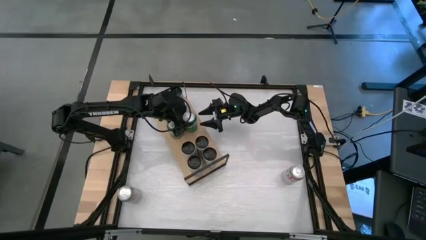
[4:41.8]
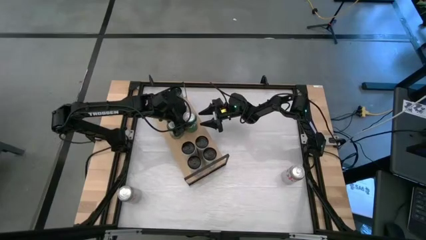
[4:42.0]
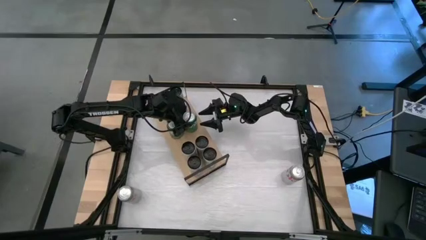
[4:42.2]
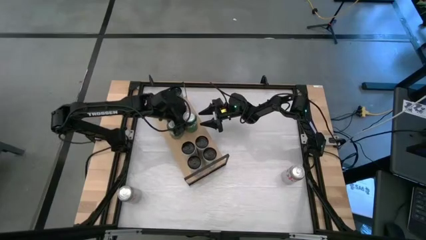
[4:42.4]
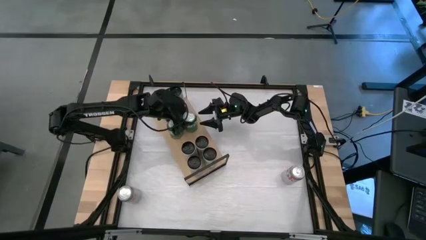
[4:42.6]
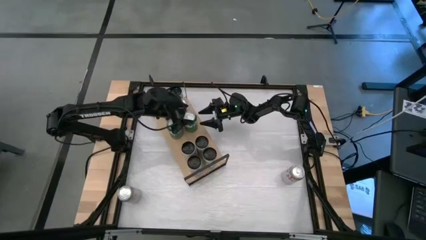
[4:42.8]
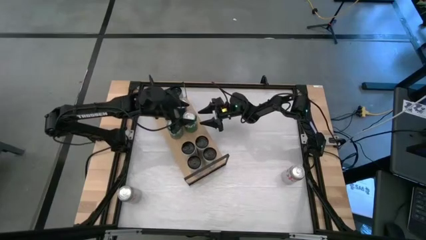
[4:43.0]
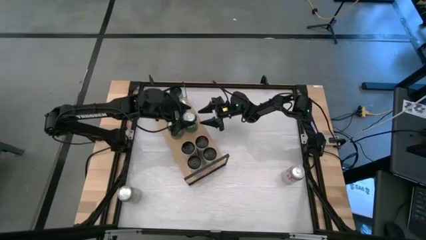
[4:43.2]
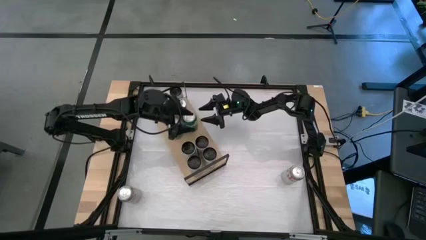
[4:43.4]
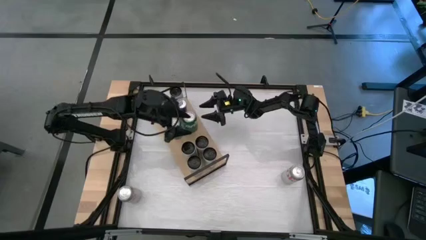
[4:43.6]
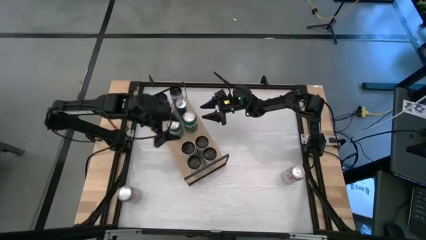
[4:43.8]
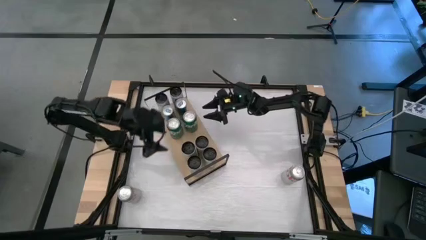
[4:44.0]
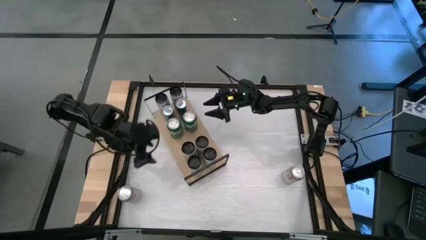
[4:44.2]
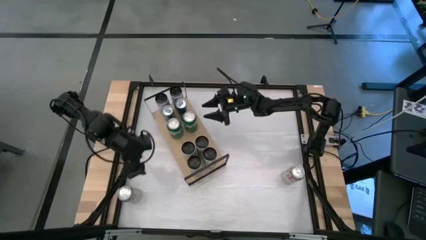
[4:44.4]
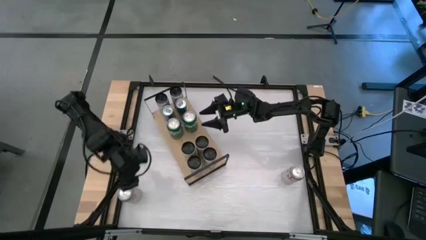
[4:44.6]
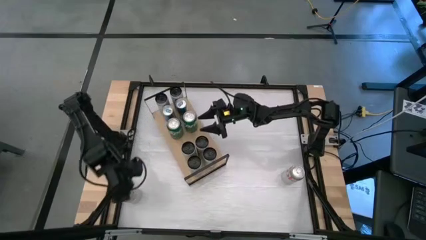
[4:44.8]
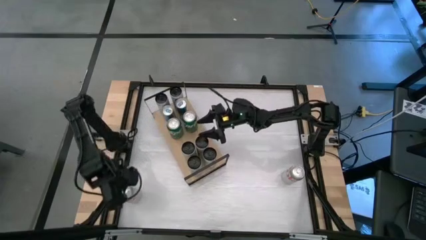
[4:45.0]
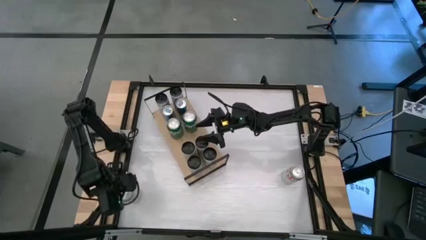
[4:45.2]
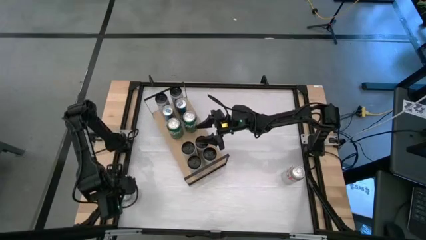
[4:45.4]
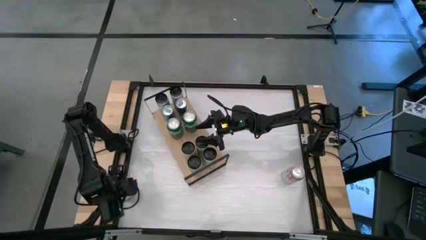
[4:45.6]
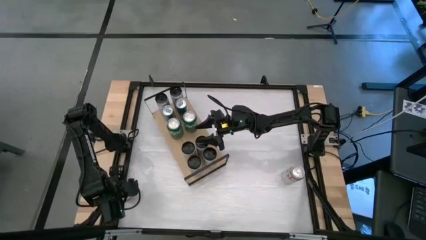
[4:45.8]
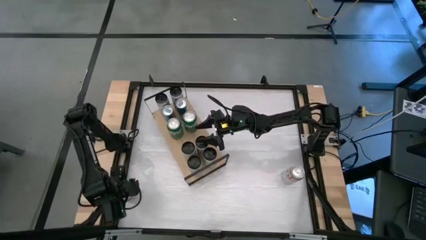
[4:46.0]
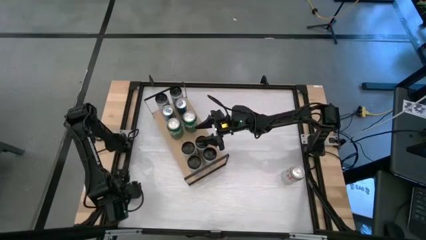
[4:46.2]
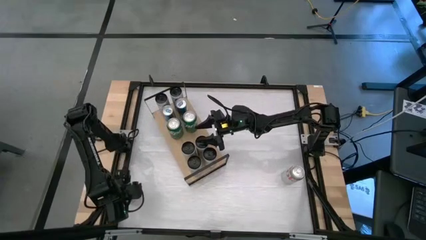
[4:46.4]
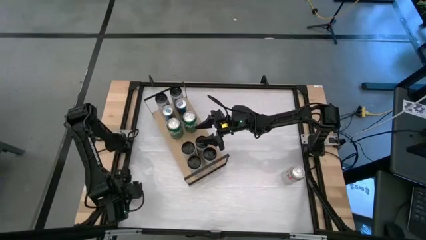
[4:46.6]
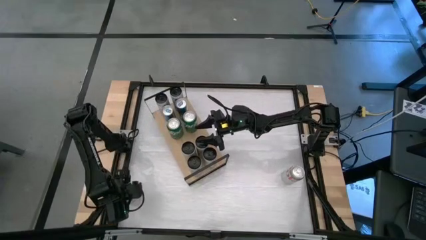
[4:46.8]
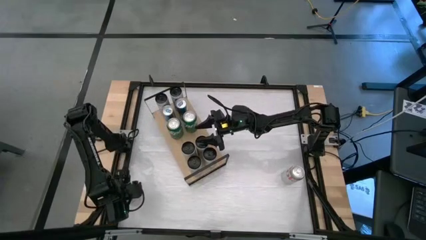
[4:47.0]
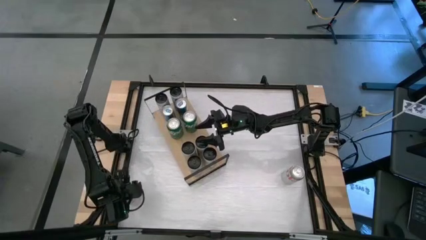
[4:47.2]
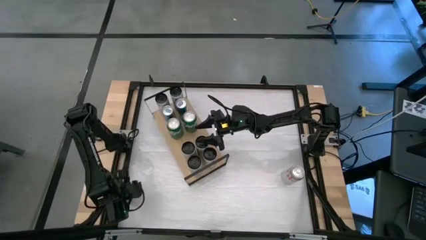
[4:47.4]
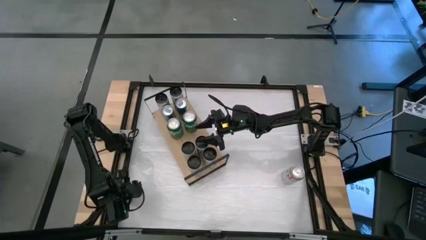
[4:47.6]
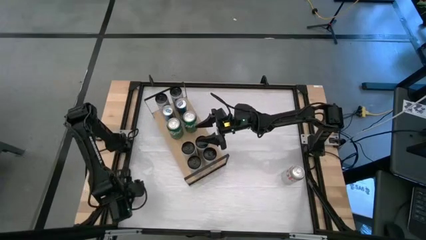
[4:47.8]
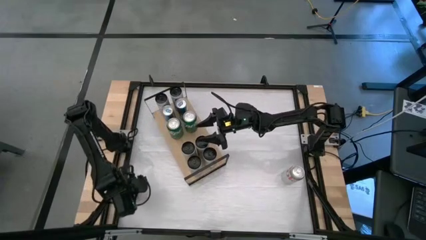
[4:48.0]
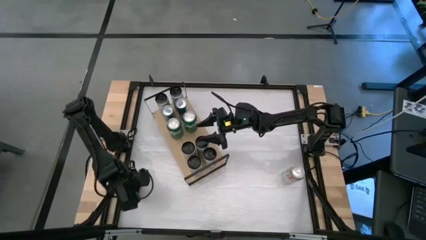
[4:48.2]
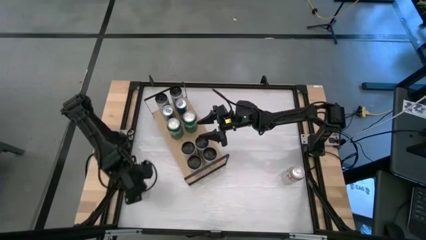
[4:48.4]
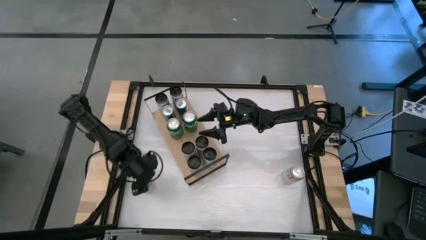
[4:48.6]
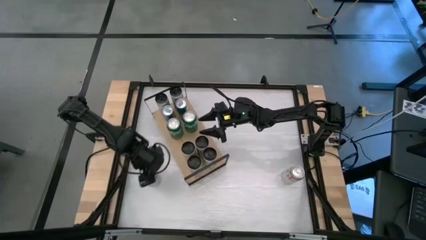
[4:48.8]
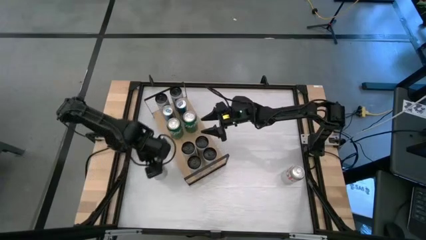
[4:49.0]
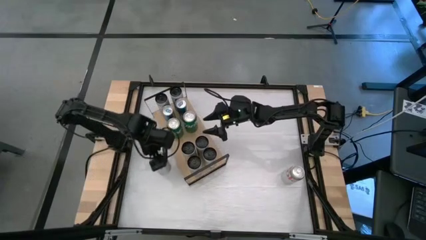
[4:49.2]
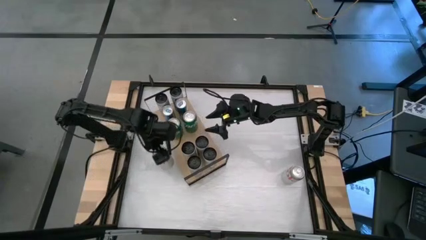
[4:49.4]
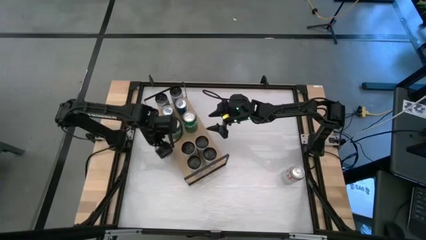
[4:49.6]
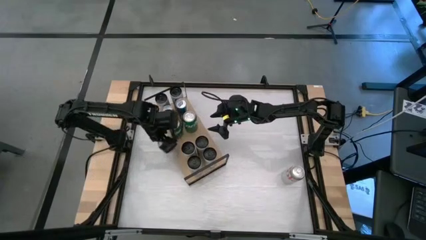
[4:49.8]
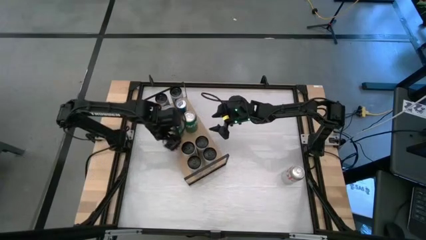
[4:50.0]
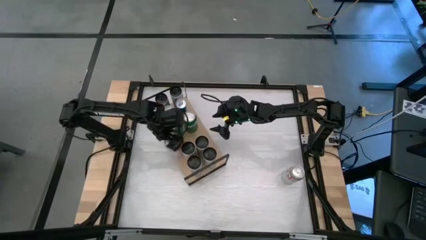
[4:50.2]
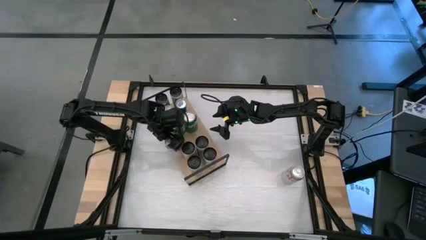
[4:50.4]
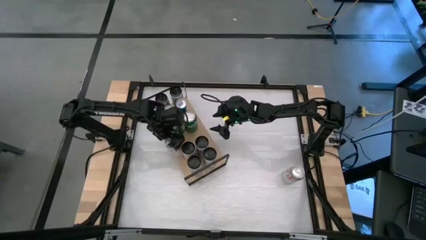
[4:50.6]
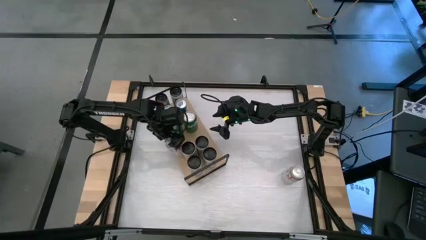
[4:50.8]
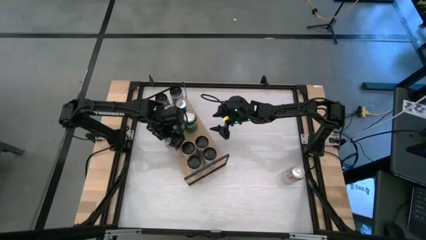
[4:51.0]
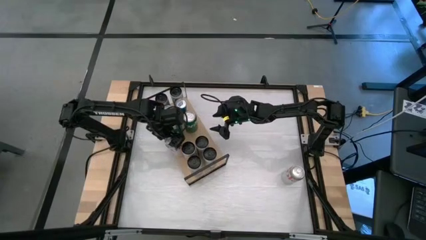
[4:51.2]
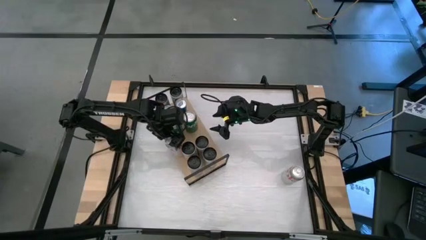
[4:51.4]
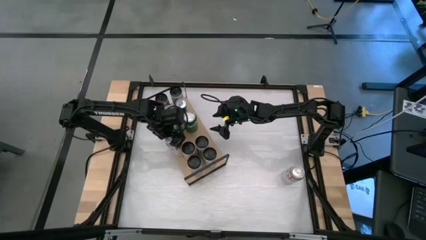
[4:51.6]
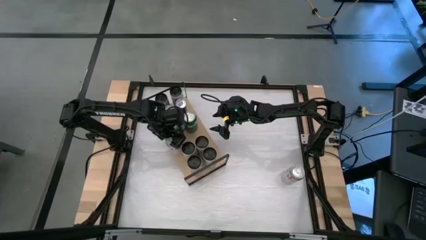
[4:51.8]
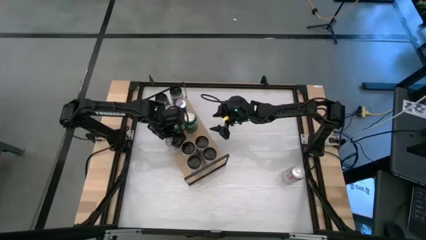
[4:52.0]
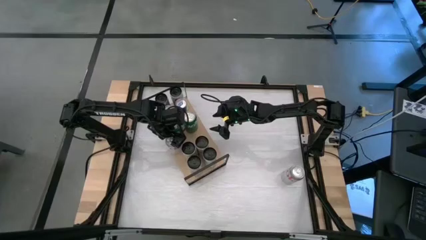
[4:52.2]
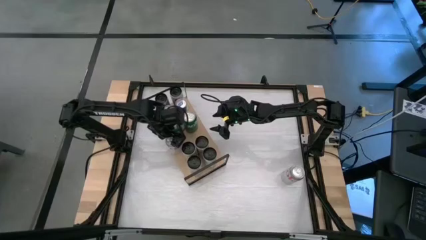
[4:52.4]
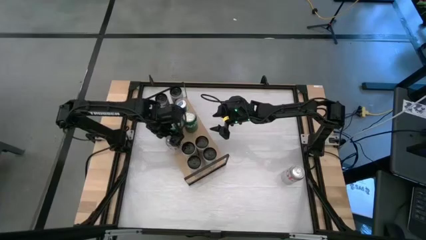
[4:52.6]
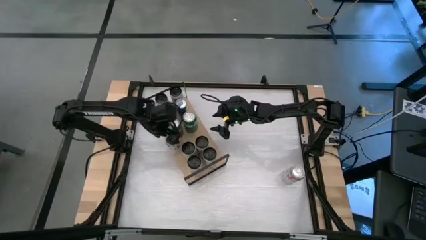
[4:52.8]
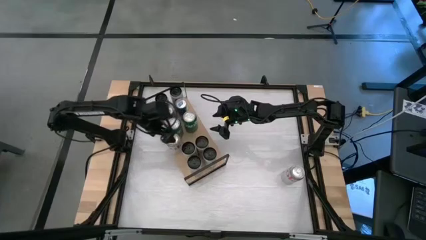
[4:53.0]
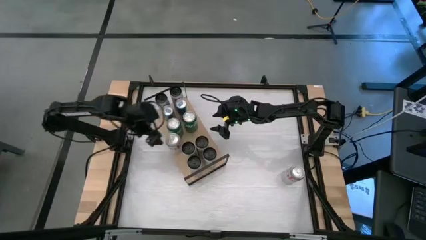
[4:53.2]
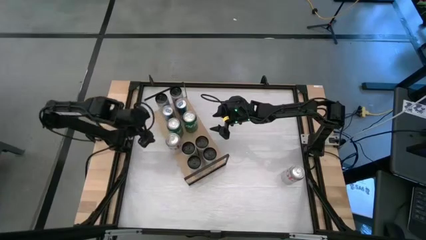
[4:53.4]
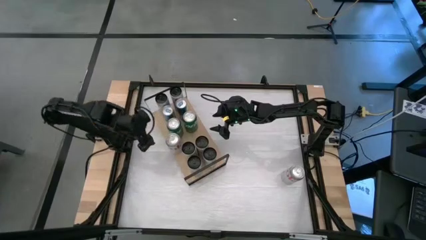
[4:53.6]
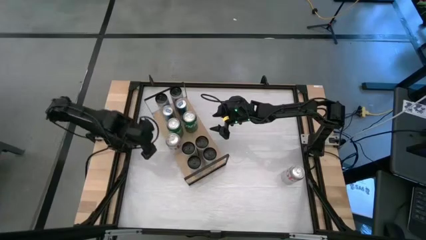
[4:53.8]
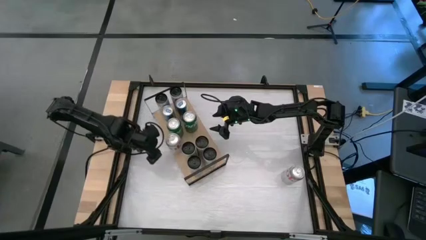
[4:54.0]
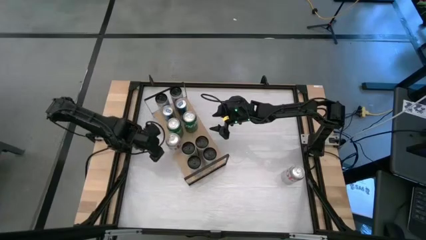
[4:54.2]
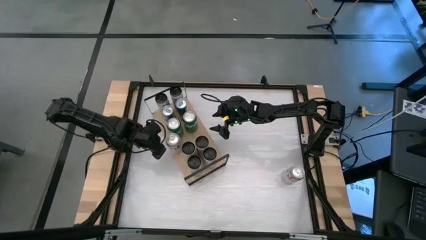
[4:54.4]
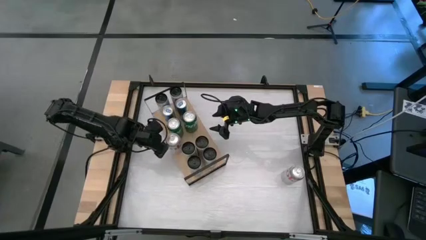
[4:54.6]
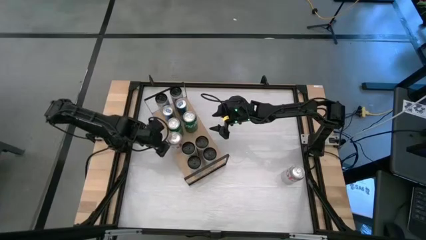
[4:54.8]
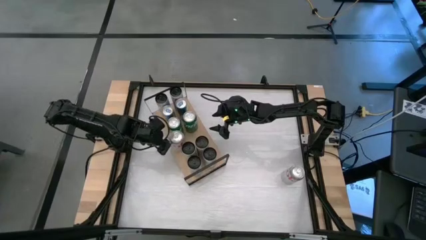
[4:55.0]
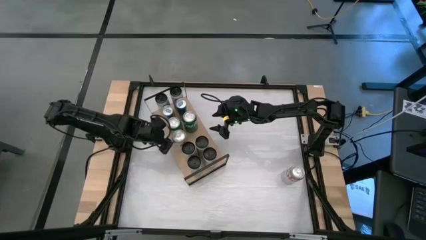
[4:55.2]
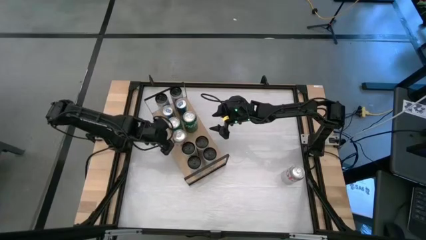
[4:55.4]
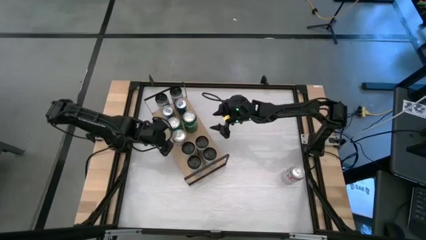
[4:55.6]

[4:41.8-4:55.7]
Task: Place canned beverage on shelf
Put the red silver soda can on the shelf
